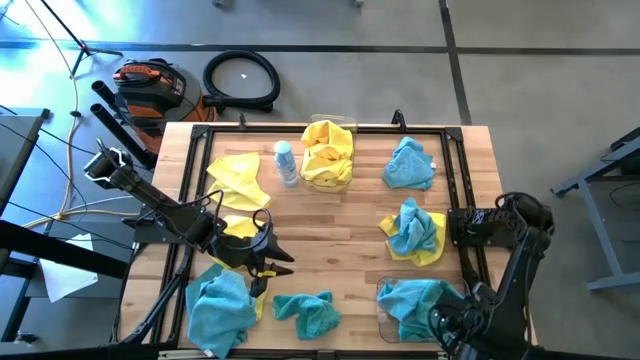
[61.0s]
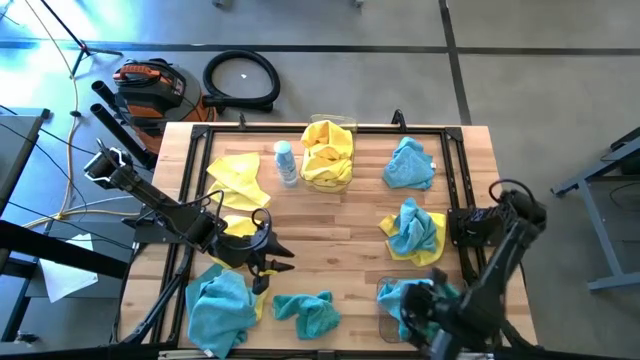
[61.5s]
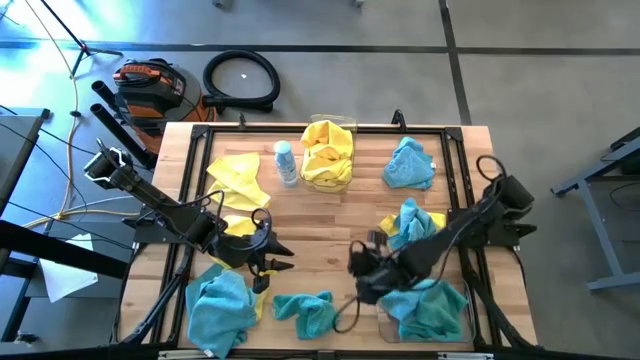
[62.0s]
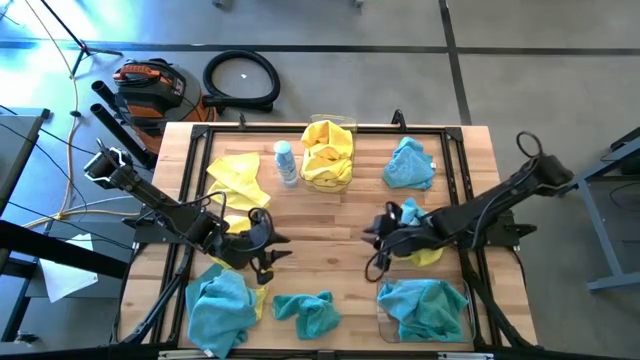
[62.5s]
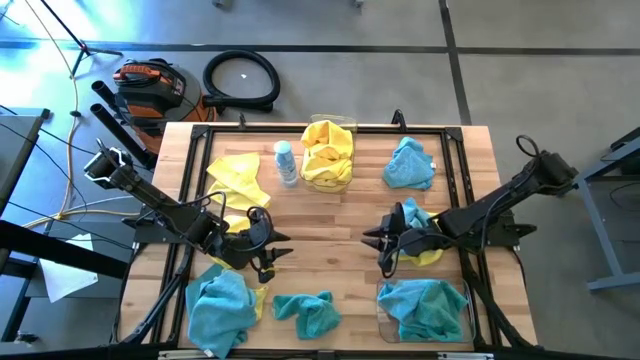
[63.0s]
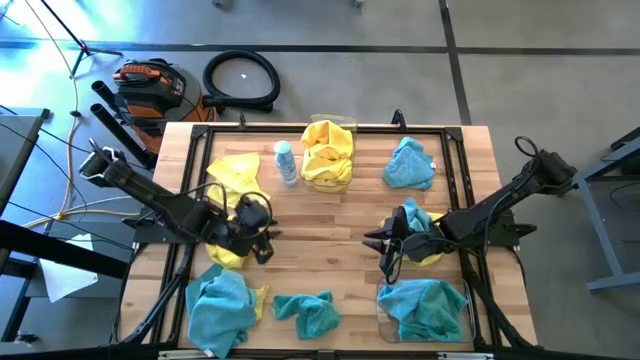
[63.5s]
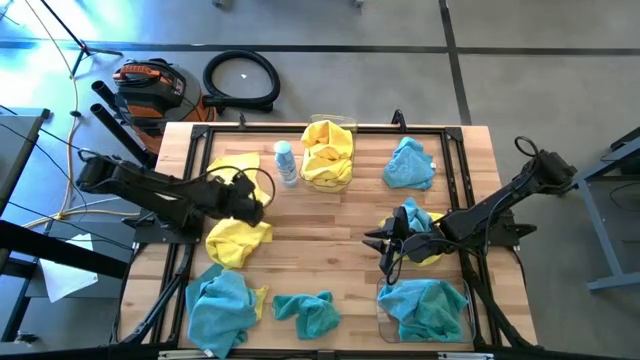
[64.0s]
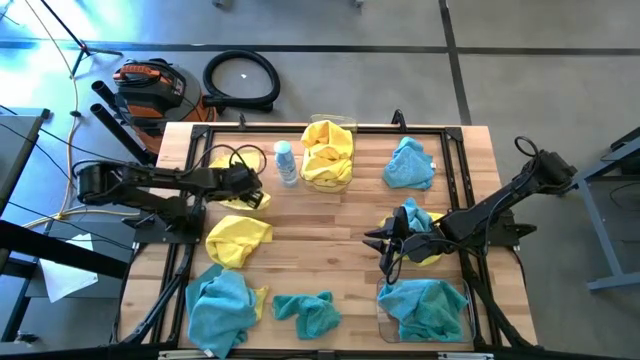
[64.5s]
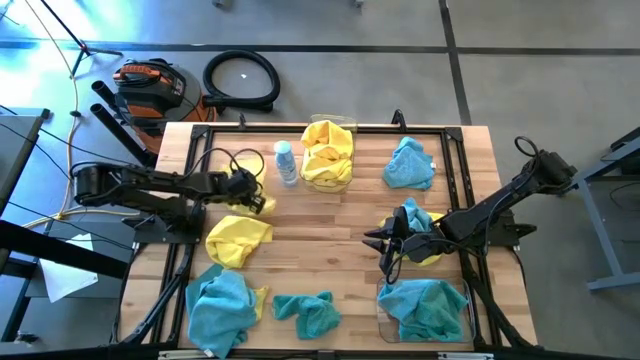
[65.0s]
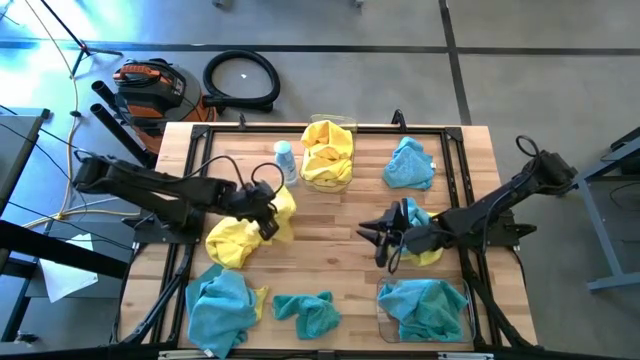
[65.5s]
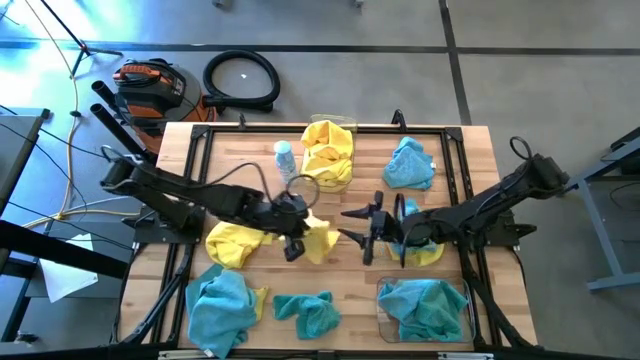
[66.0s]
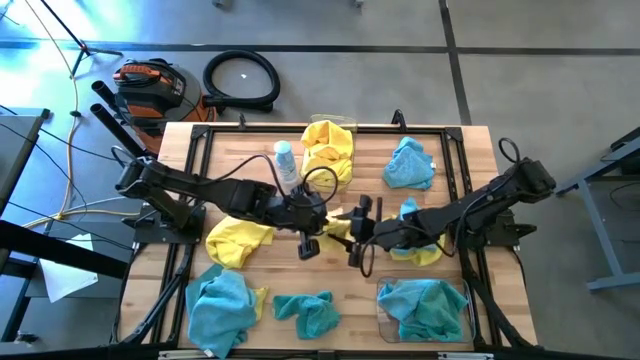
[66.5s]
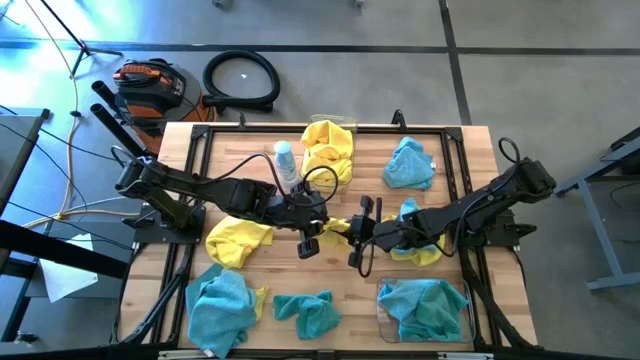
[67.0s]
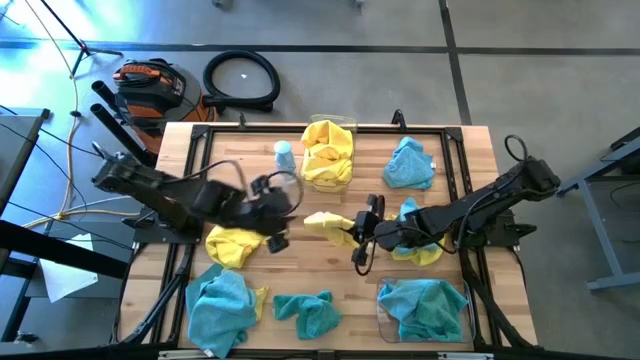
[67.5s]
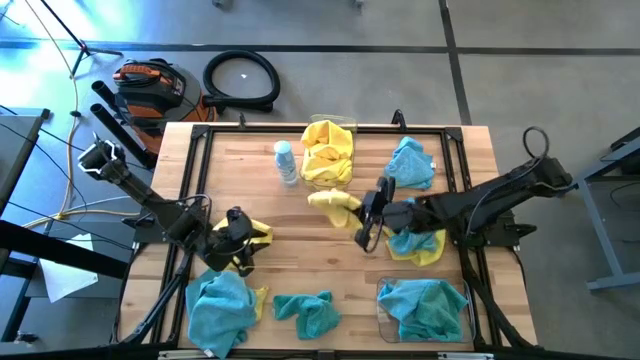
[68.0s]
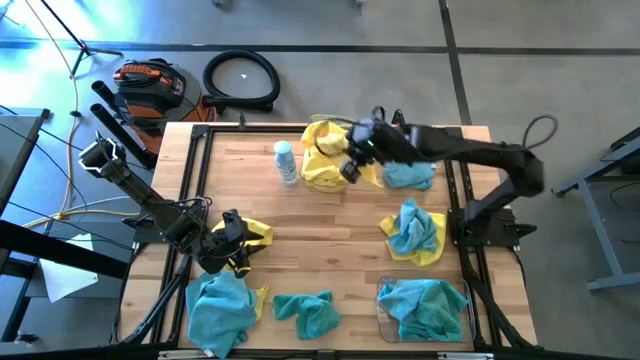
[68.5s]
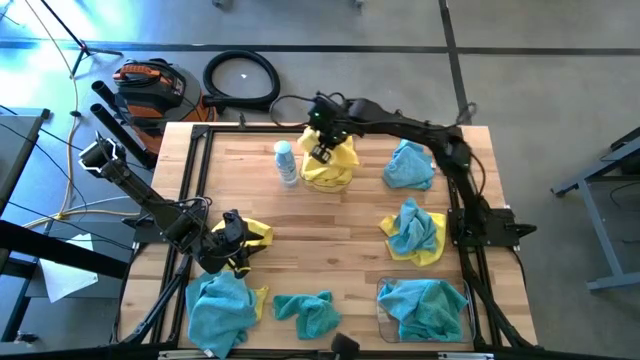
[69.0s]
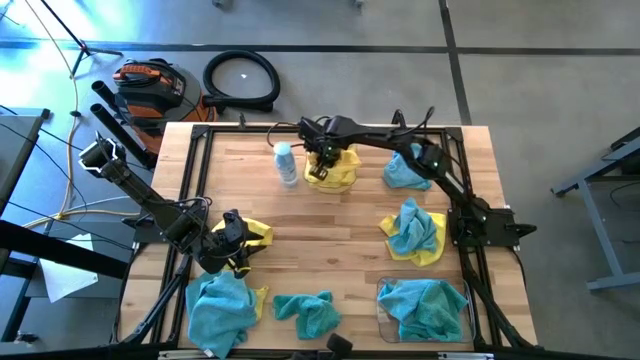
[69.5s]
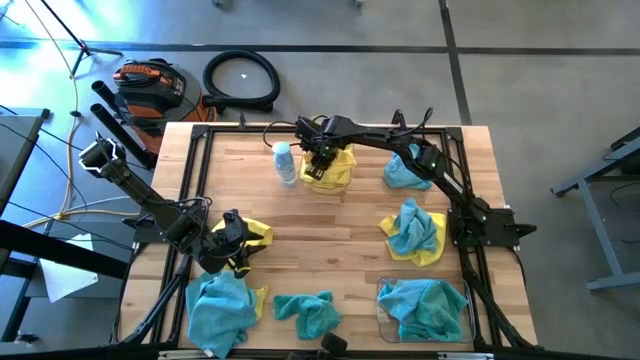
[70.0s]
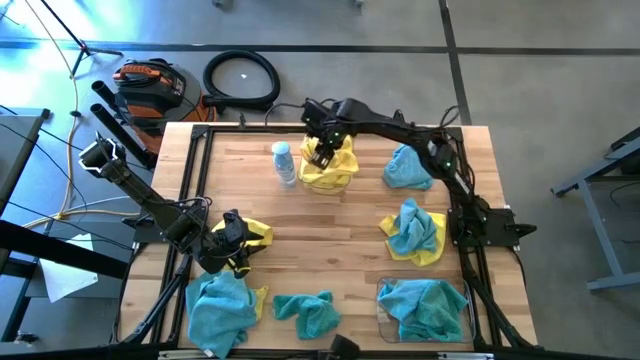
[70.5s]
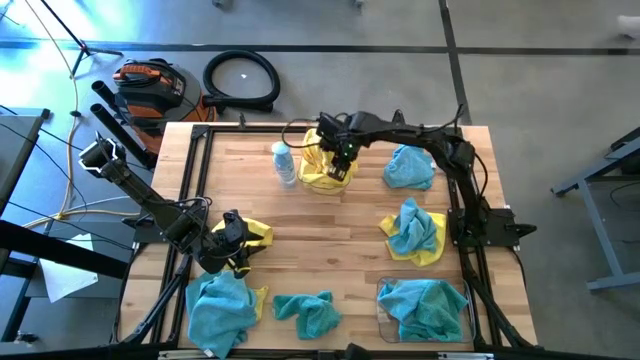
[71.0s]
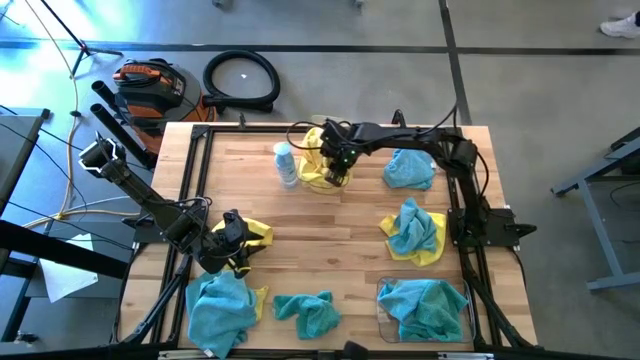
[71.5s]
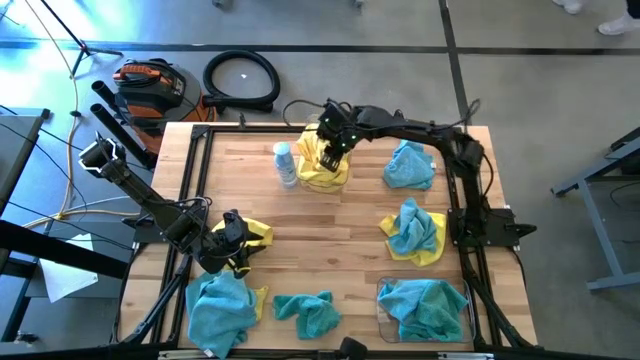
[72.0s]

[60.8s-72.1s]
Task: Sort microfiber towel by color & place in baskets
Put the yellow towel into the top transparent bin

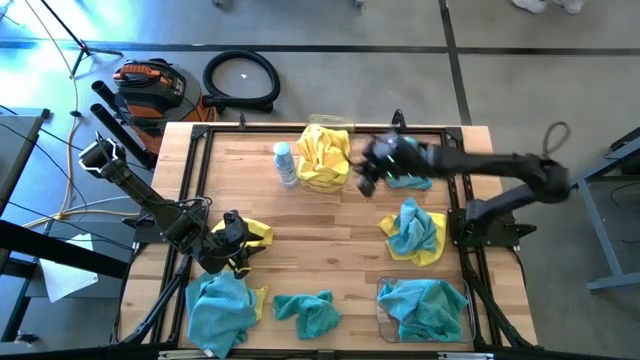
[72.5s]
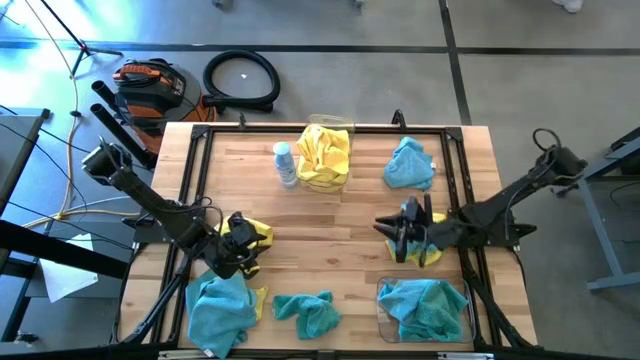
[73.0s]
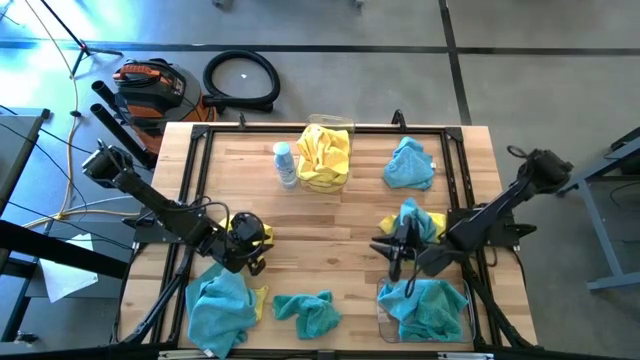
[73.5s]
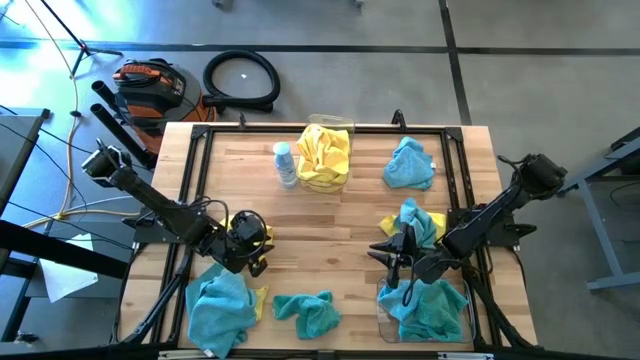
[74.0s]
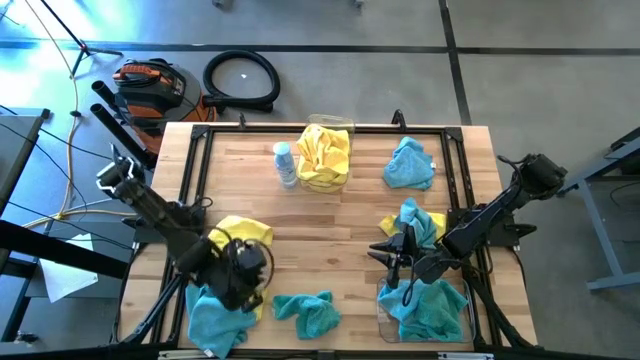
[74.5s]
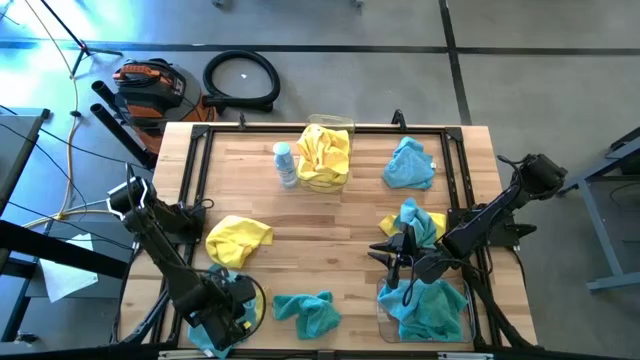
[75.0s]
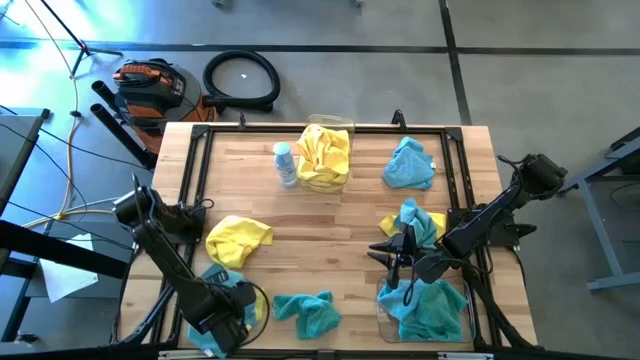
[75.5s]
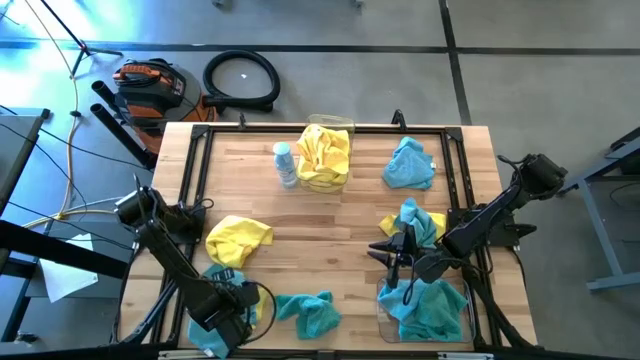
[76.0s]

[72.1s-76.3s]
Put the blue towel into the bottom transparent bin

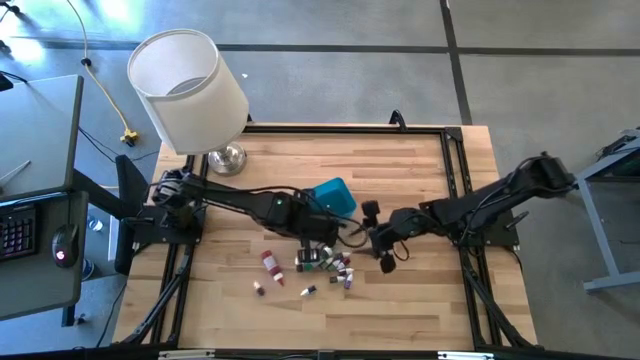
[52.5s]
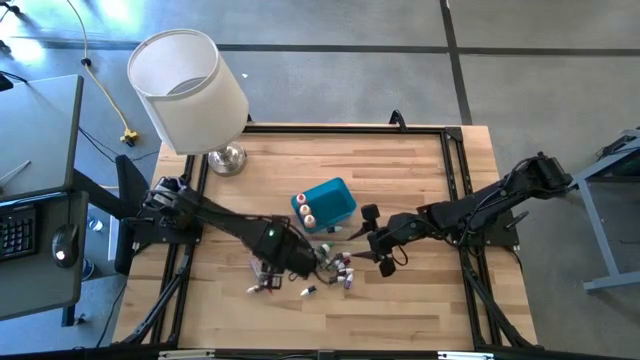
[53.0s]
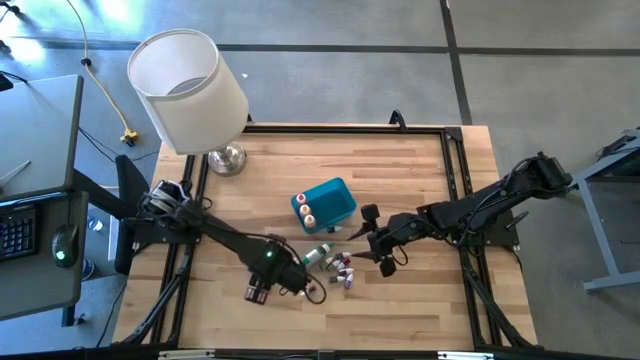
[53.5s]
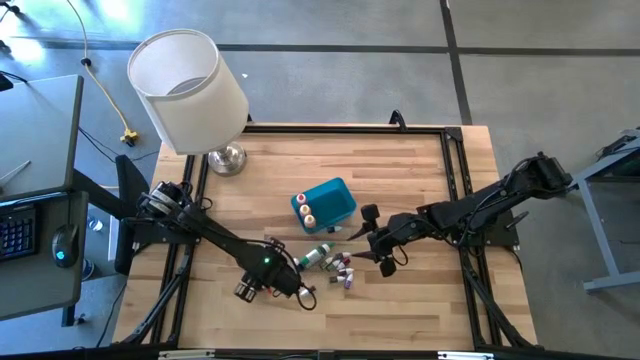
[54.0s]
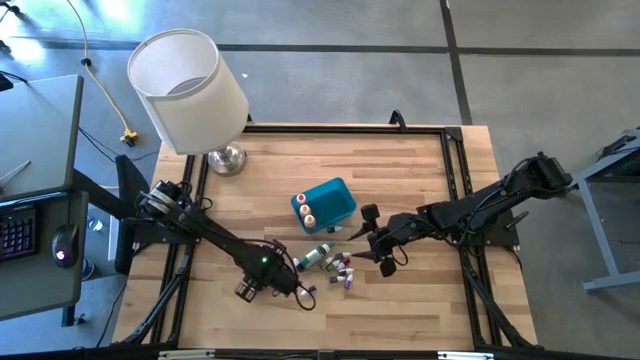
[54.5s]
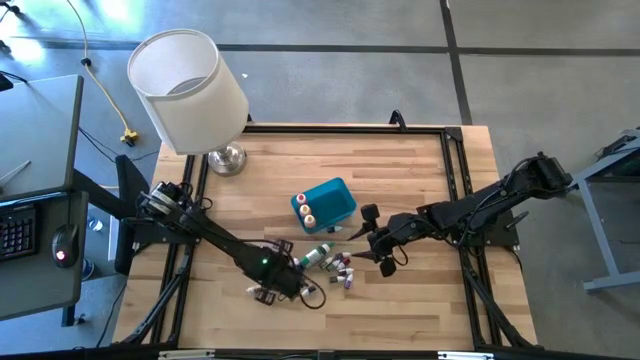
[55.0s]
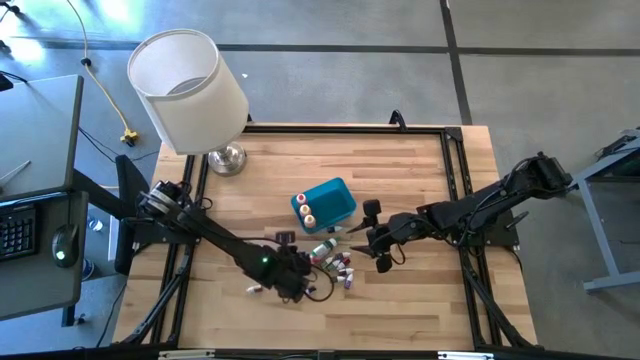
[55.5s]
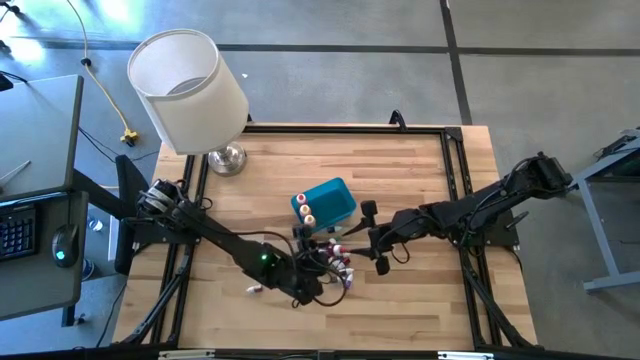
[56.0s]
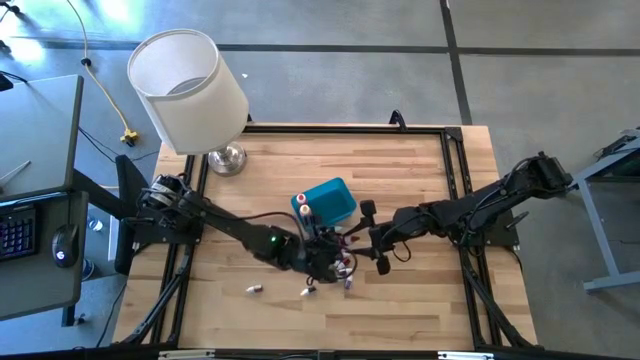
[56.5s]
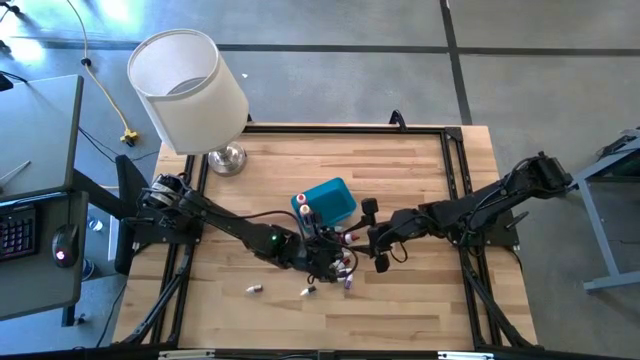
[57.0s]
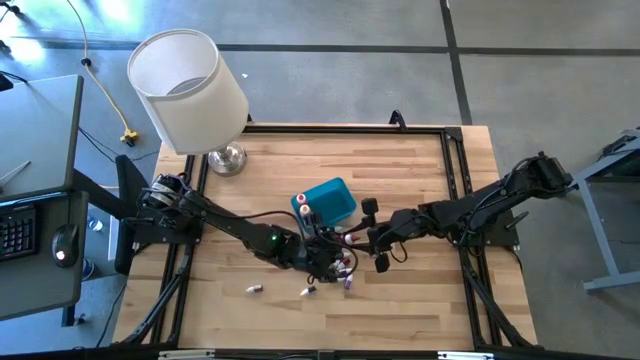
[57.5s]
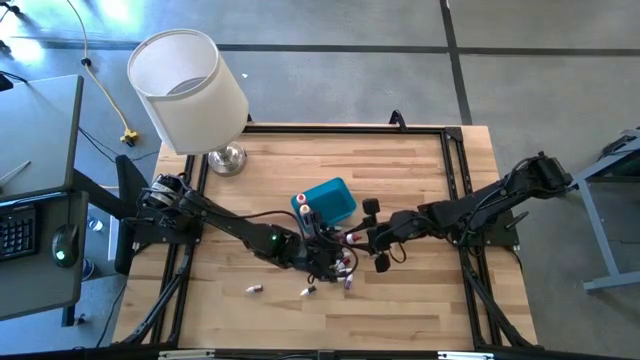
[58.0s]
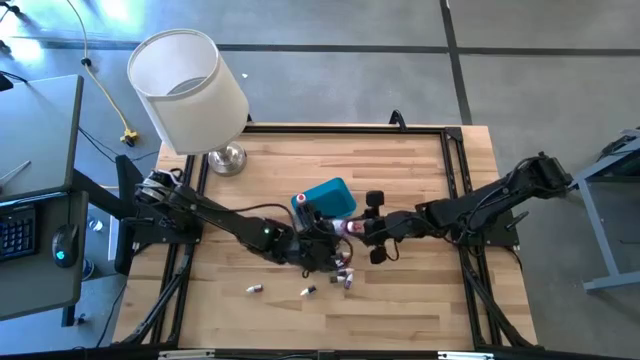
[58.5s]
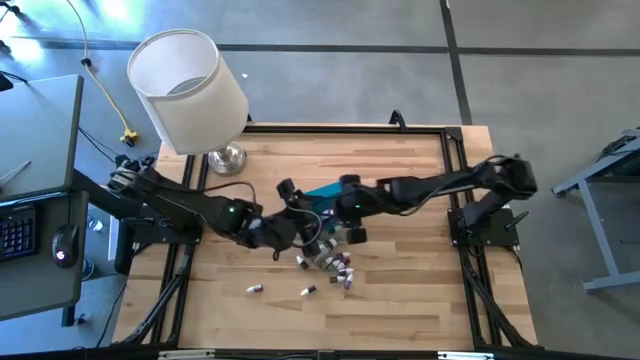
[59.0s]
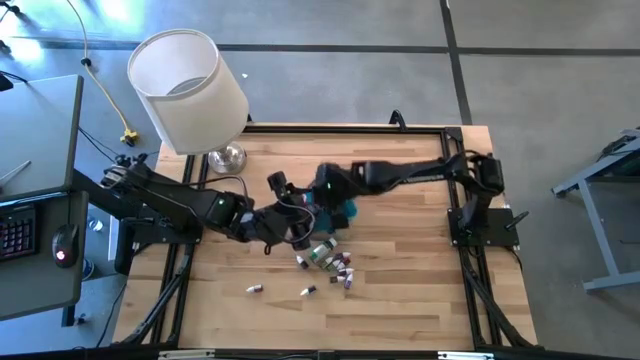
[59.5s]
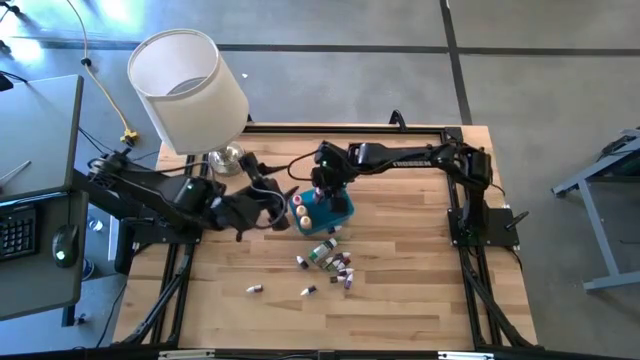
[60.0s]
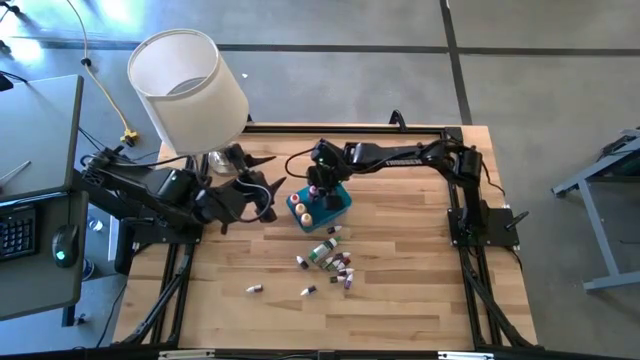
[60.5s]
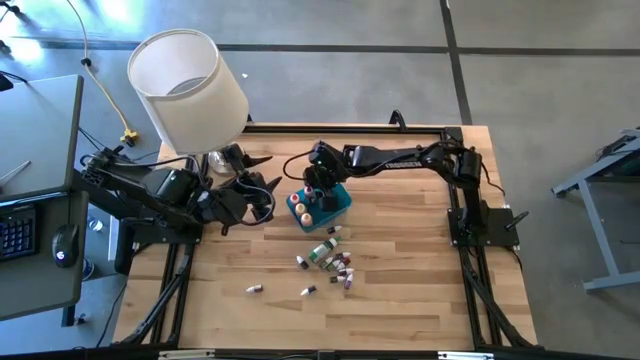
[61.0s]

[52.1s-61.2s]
Task: Pick & Place food coloring
Put the large red food coloring bottle into the bin
